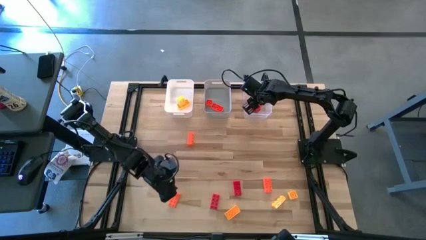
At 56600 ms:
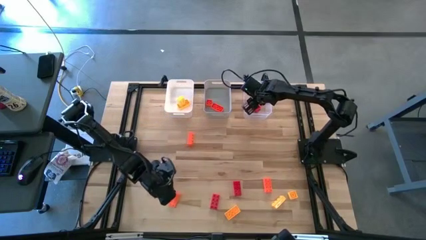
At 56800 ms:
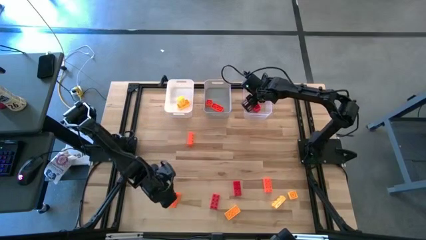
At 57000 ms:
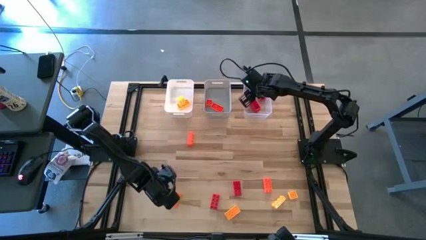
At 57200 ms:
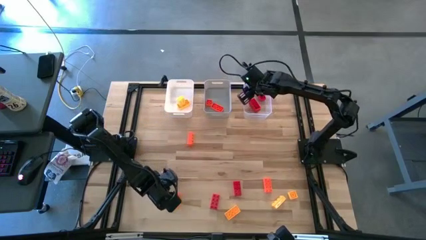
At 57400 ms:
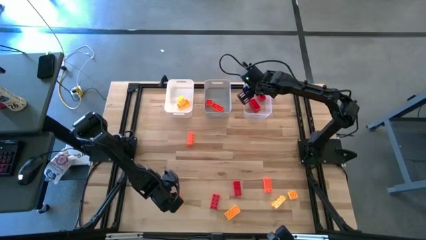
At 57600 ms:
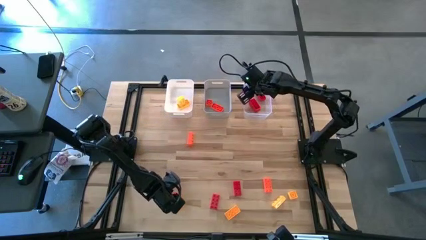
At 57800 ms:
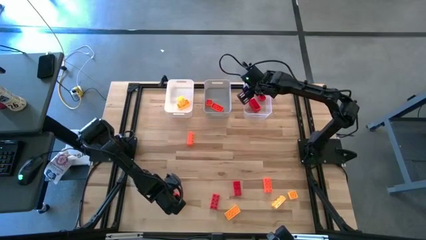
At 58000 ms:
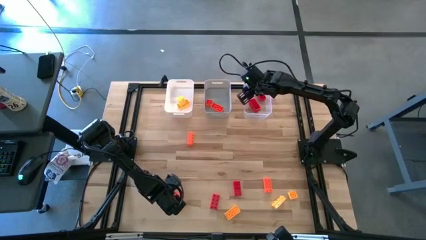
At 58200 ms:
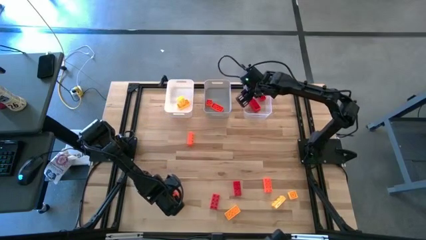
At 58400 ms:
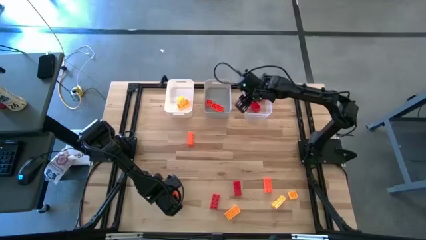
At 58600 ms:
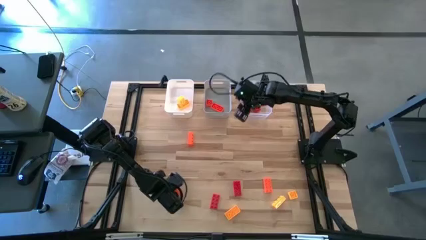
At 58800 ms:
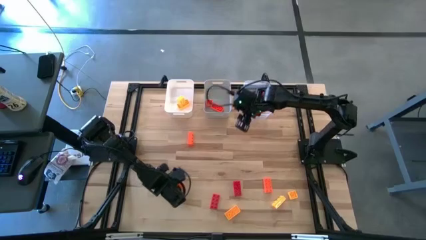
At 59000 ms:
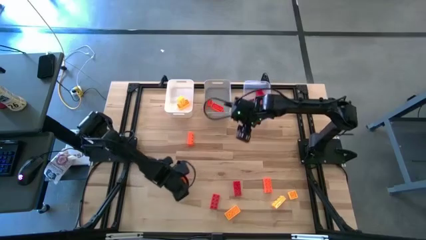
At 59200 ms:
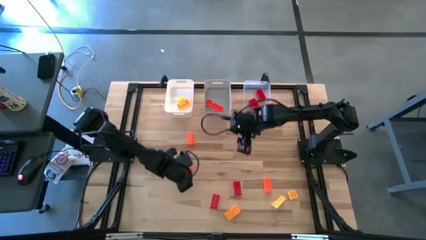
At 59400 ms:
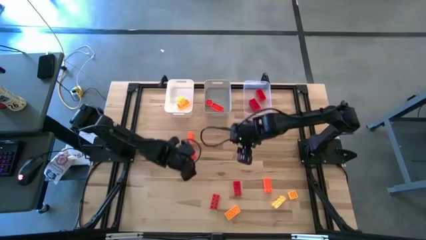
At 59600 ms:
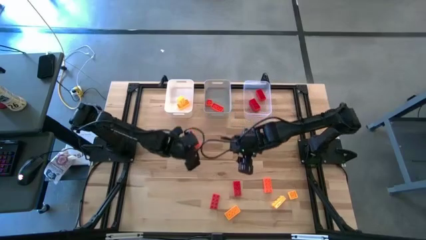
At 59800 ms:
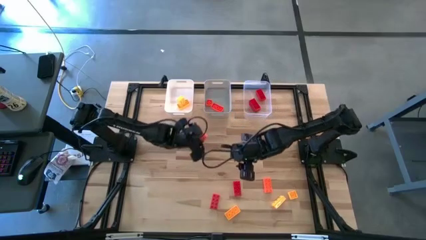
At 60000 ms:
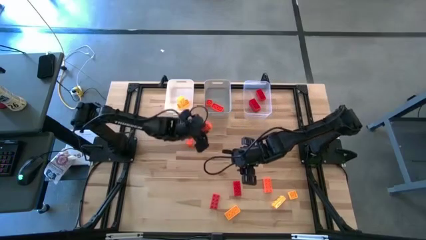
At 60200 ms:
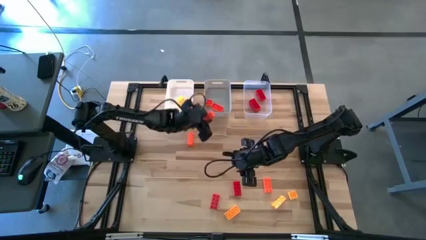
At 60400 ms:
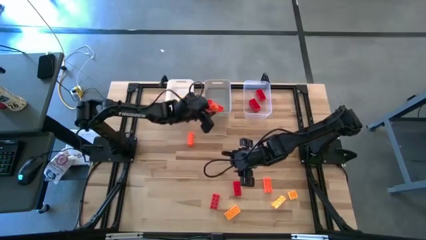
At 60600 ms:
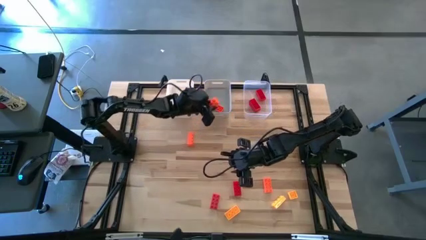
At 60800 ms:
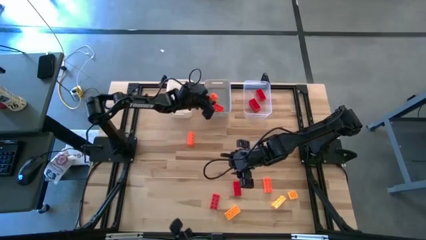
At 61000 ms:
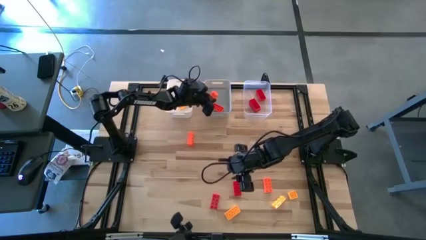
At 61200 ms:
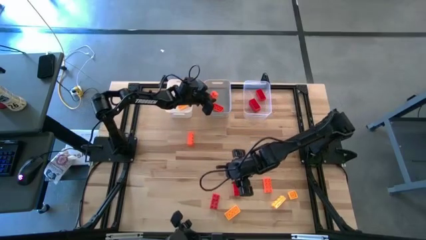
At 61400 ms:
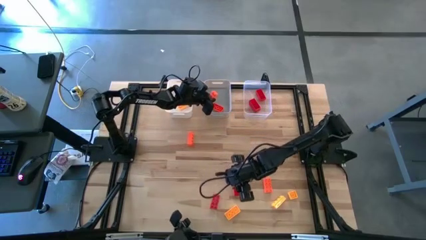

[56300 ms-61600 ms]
Task: Sort & place blocks by color
Put the orange game piece into the gray bin

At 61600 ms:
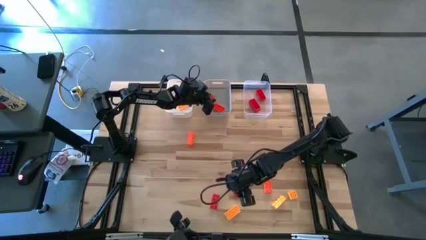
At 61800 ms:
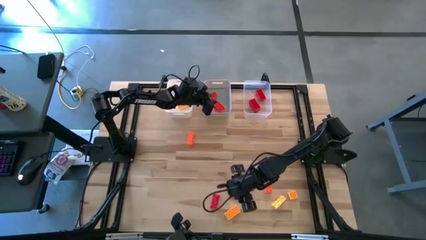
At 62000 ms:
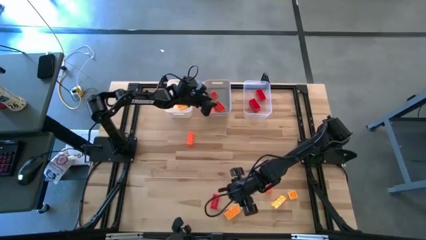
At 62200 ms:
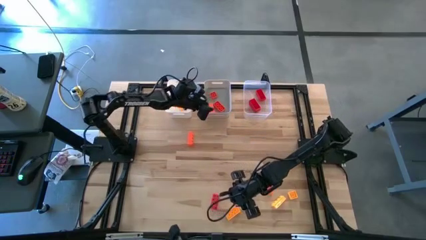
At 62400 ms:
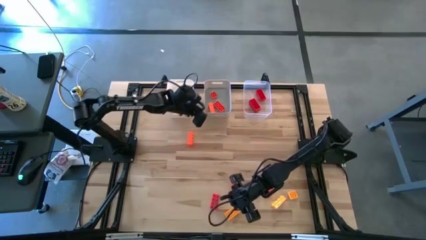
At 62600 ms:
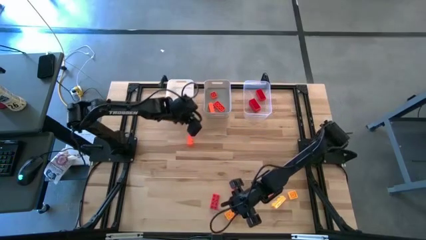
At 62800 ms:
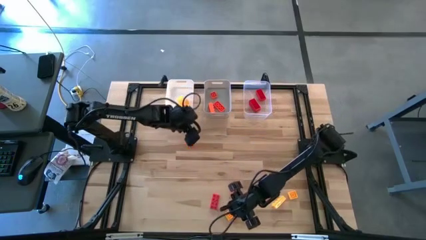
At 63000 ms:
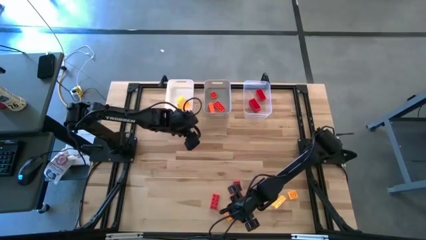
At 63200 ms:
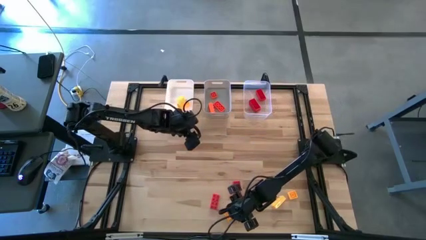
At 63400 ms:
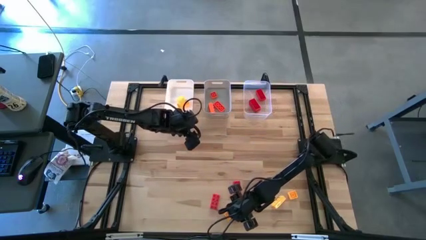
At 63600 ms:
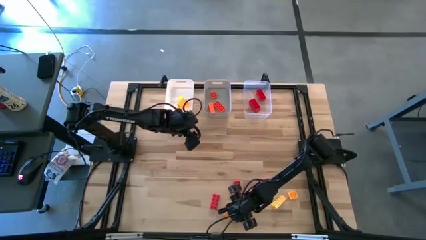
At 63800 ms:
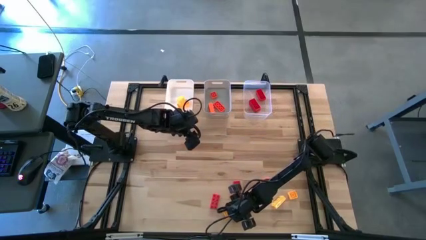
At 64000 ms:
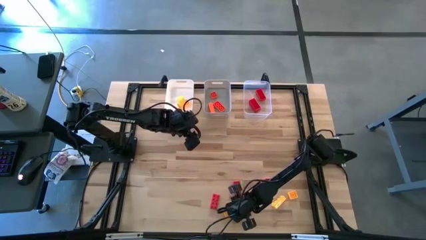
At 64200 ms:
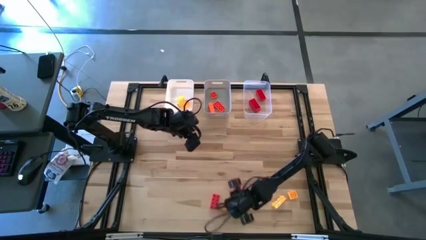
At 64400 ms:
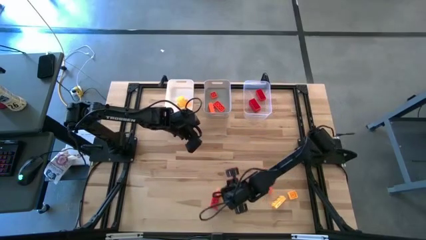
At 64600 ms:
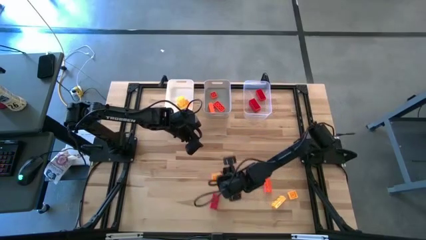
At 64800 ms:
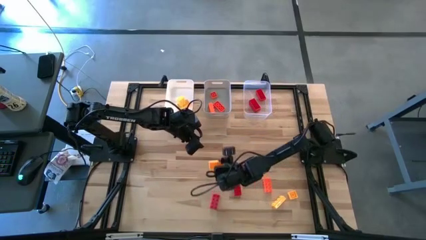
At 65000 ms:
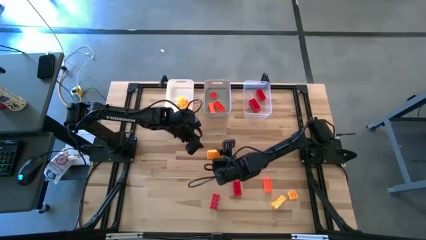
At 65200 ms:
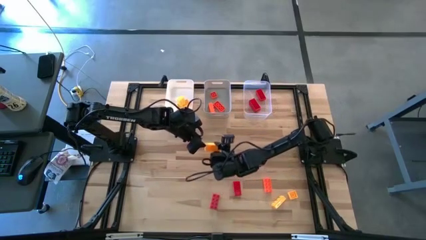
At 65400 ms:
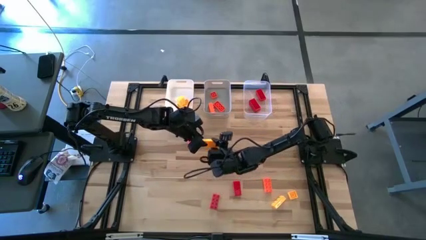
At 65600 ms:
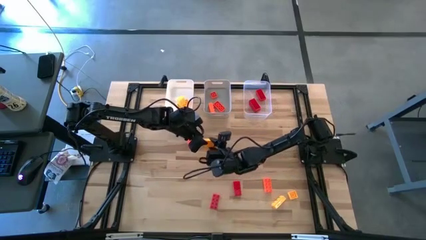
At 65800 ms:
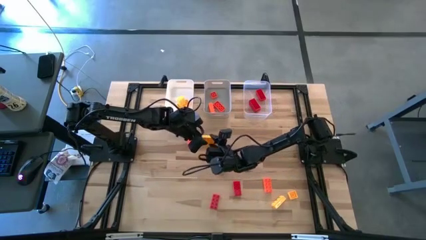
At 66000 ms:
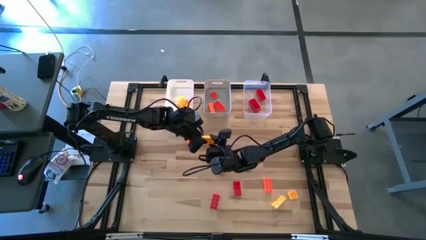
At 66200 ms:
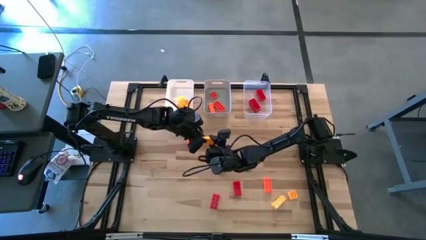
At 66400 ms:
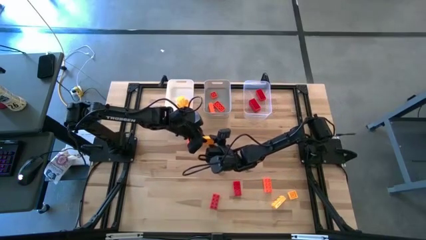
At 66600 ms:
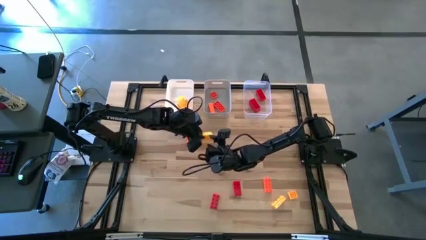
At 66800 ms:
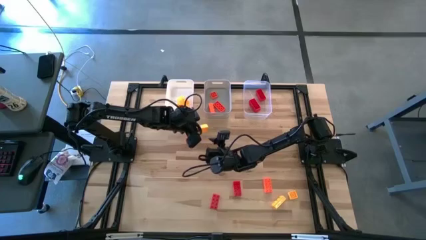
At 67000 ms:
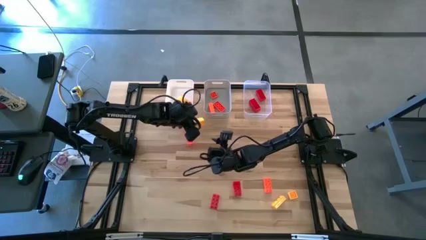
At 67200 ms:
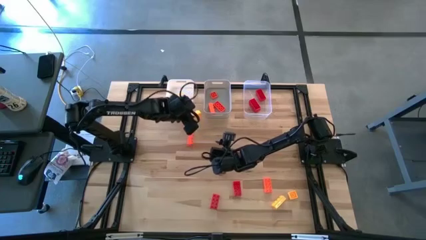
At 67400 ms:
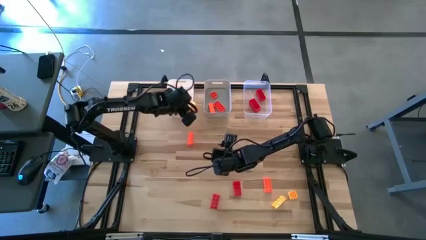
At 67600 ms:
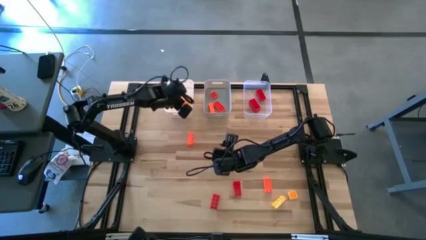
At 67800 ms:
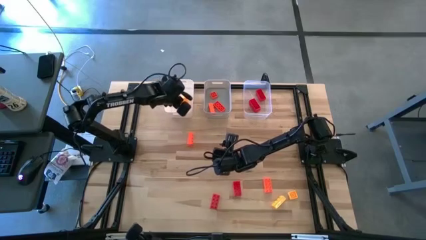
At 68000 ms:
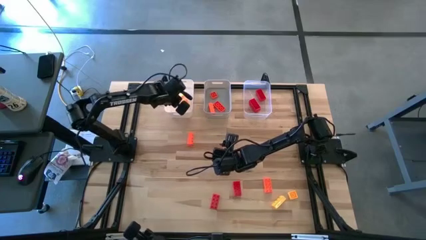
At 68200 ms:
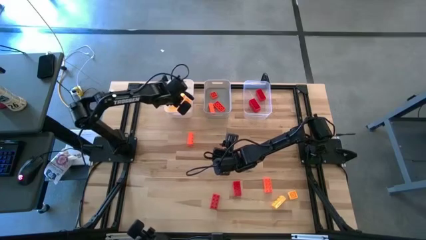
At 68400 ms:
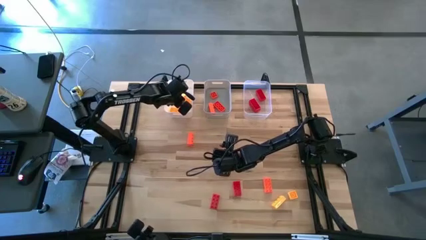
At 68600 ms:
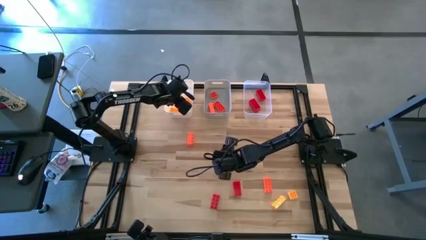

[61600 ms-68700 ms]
Put the yellow game piece into the white bin
